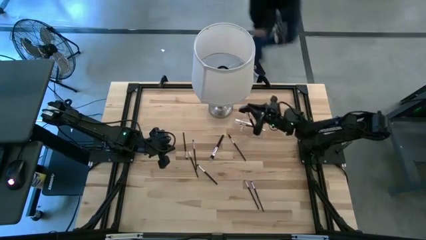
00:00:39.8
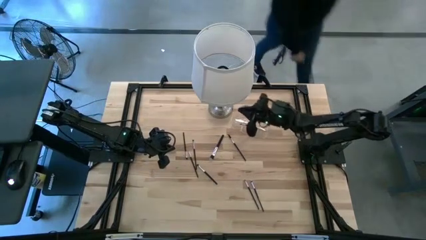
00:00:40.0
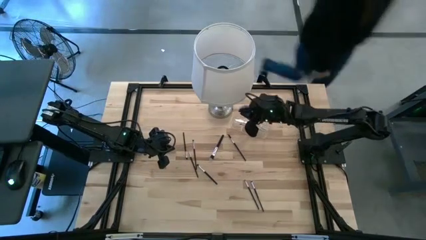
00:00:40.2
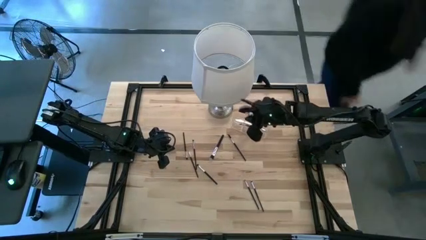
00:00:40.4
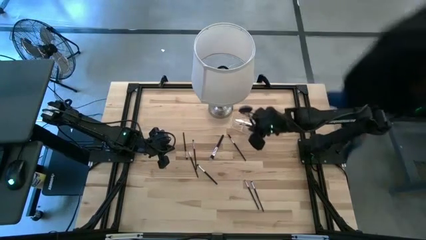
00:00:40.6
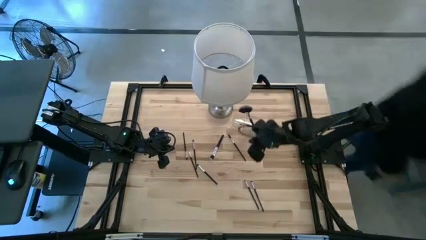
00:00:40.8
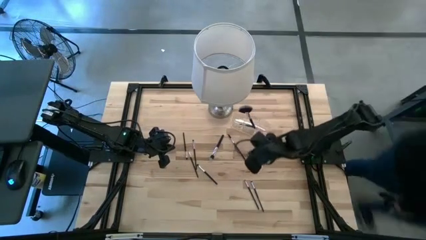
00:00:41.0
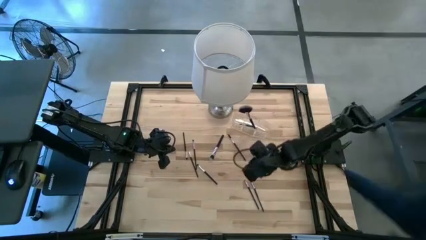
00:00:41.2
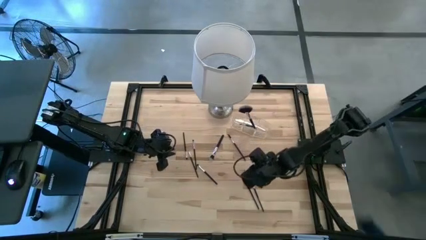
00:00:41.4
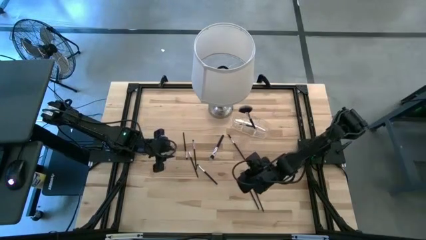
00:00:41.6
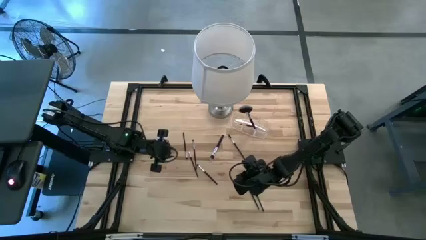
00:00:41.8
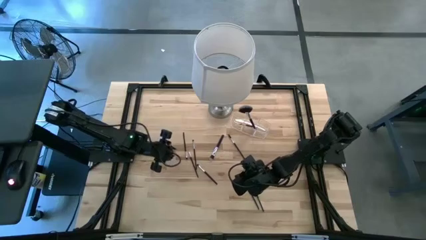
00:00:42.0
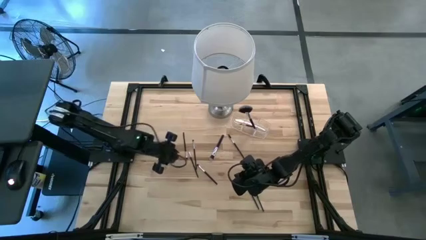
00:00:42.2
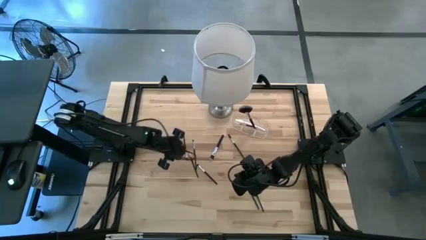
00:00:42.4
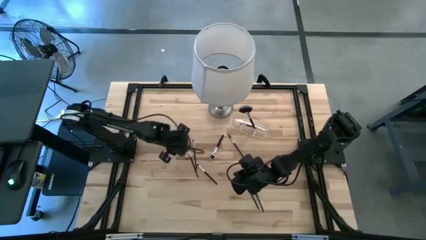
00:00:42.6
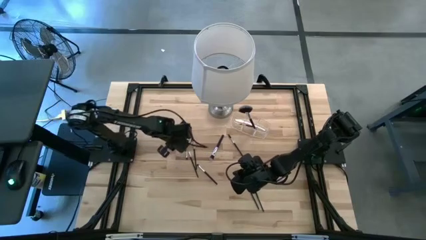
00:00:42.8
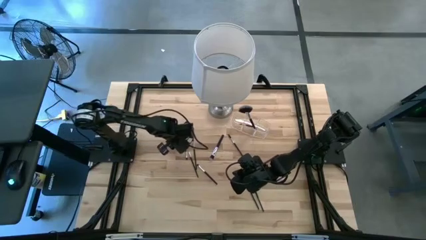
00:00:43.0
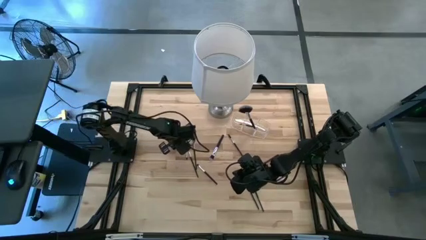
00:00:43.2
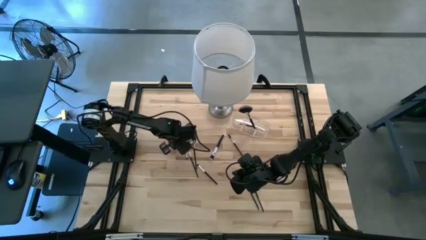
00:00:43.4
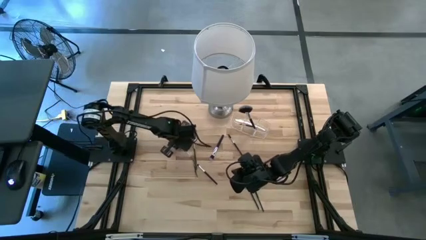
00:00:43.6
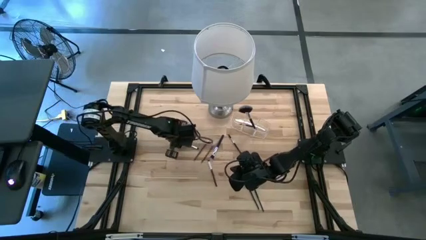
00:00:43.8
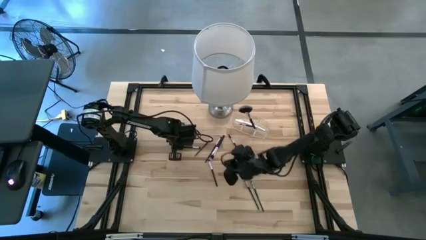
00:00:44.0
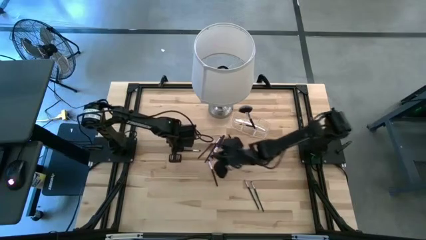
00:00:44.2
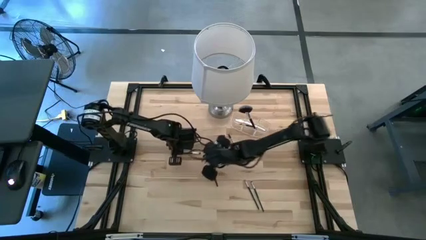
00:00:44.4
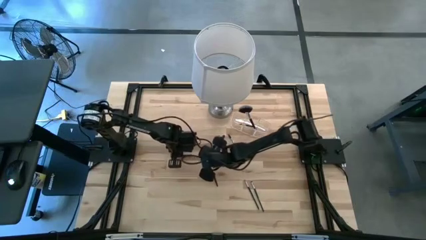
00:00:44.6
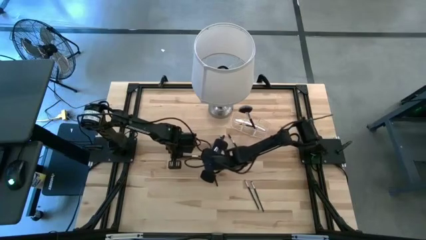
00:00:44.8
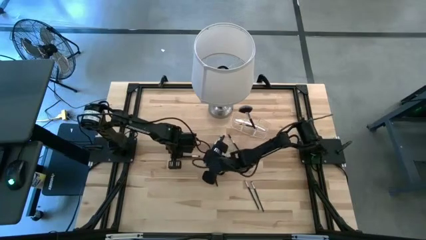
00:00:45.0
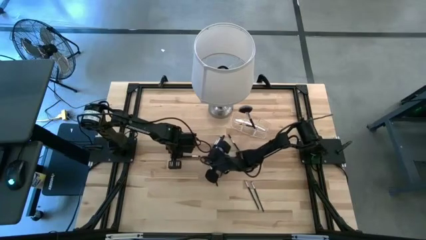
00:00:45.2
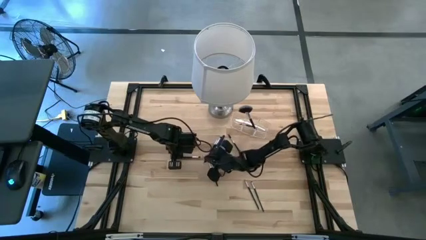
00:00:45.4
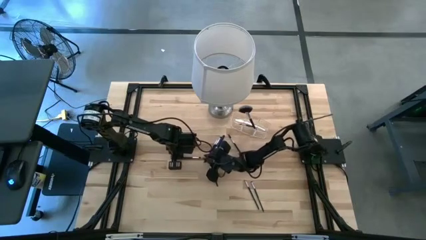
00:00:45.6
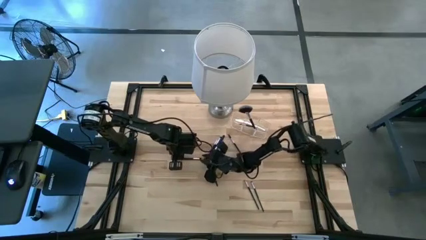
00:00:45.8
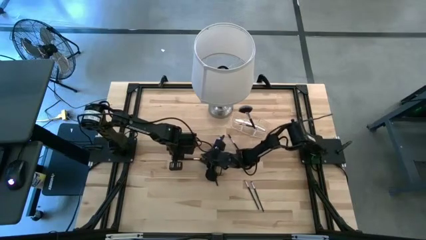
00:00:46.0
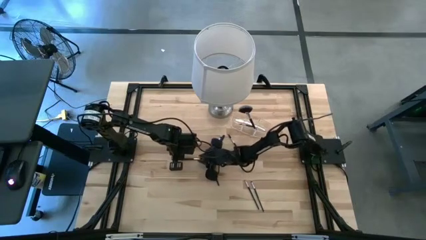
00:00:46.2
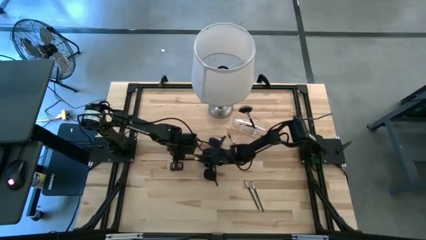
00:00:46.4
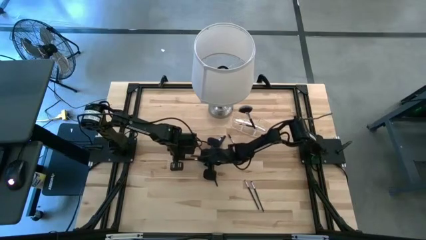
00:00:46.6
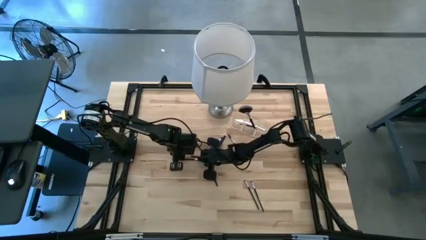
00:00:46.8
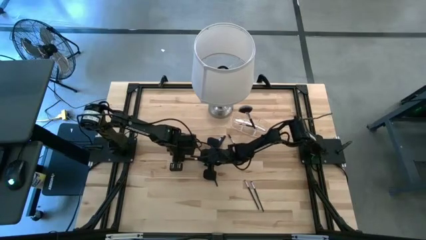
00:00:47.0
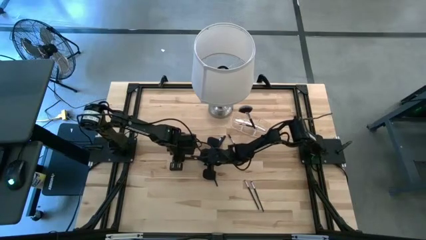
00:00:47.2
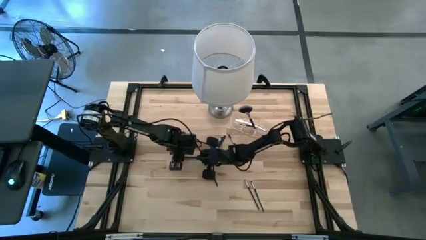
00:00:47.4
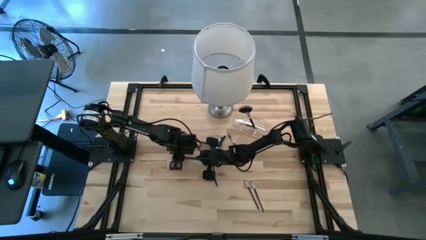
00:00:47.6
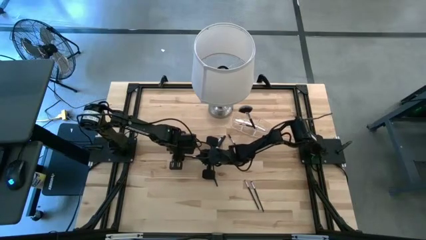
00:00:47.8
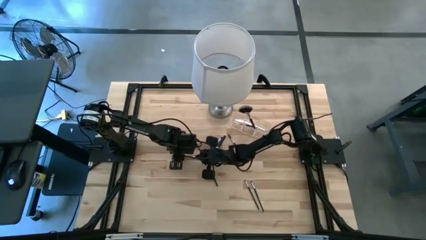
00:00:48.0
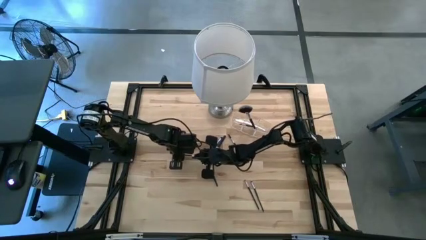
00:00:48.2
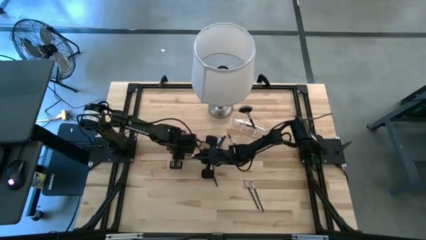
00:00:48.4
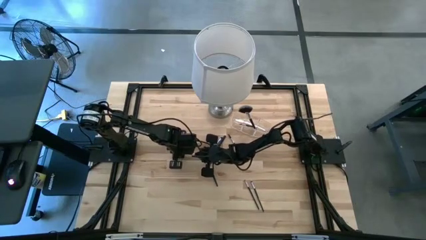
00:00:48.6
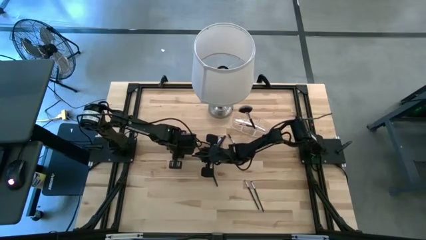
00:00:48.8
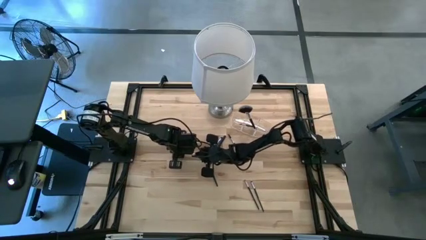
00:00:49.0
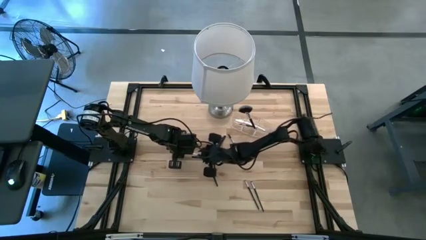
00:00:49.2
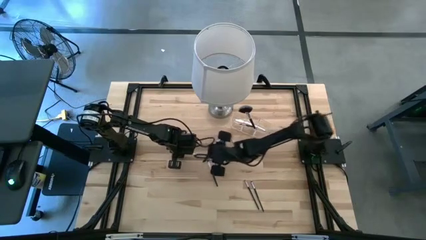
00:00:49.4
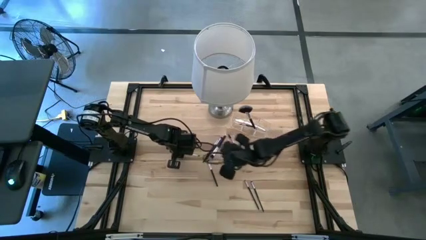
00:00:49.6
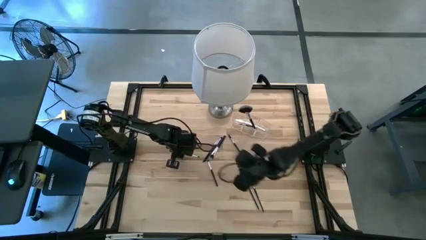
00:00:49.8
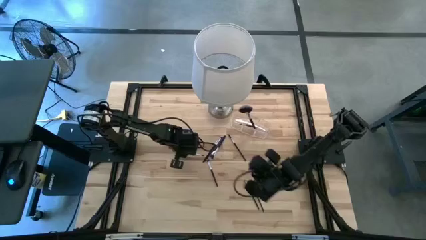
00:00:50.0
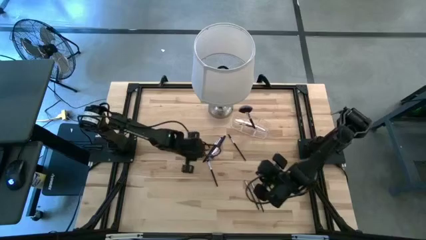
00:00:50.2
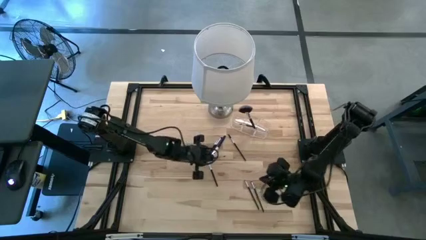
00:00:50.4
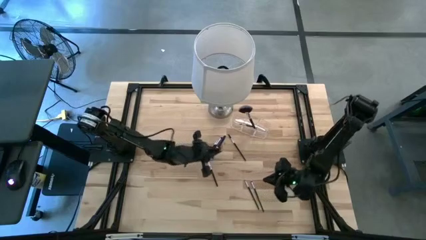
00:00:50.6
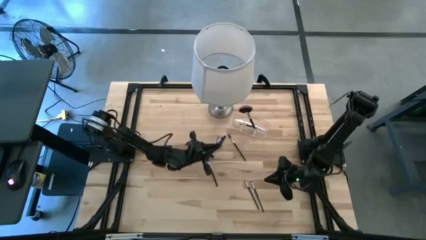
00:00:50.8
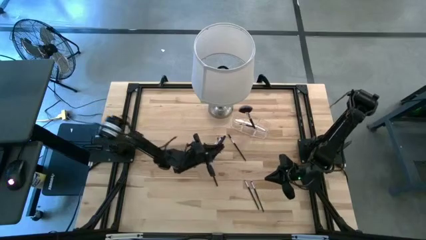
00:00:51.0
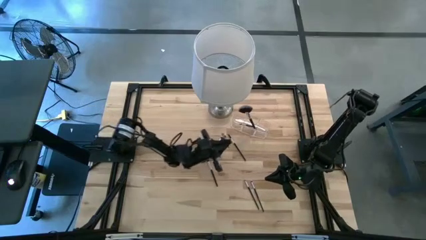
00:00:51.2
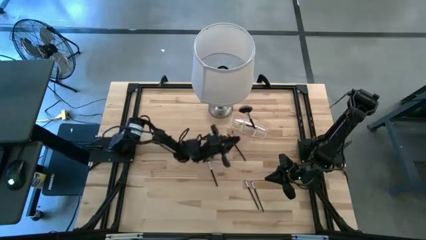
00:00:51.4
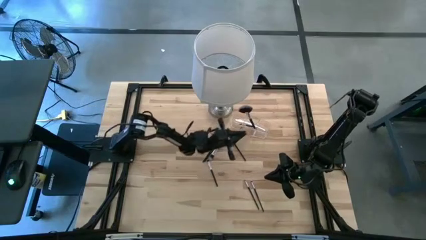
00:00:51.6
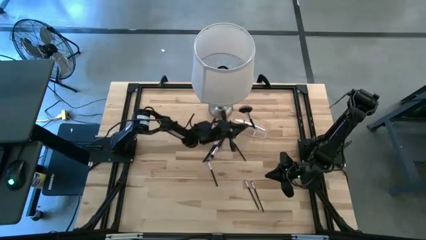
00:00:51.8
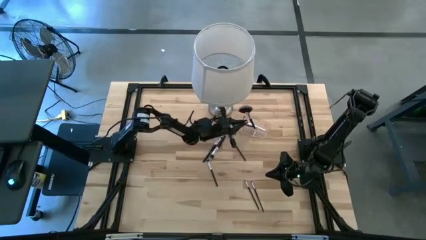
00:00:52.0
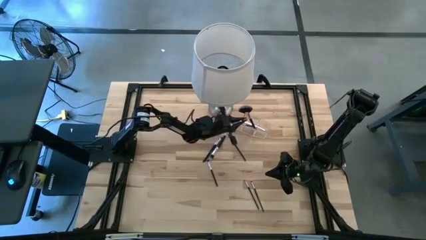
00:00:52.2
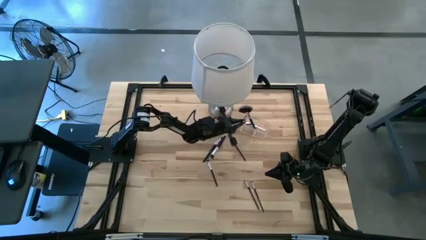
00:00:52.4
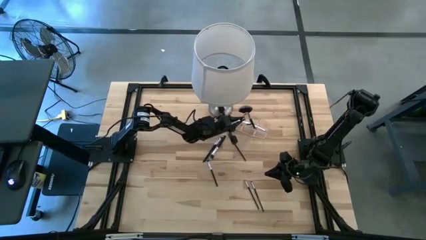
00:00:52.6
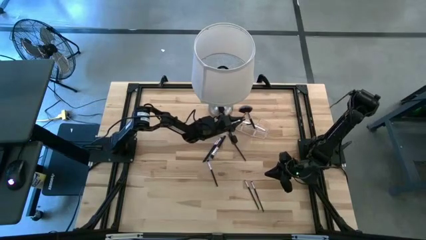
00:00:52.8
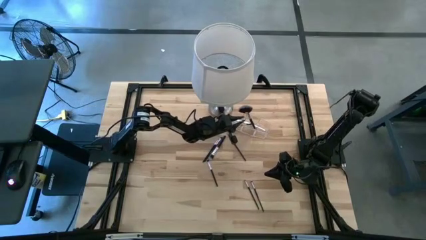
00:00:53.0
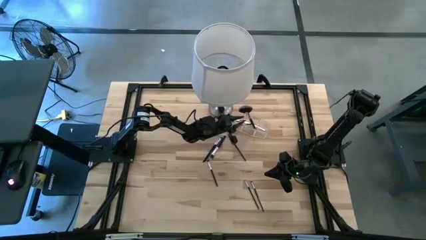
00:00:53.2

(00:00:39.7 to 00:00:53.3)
Task: Put items in baskets/containers
Put the black eyeshadow brush into the transparent organizer

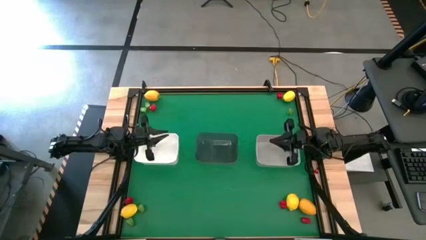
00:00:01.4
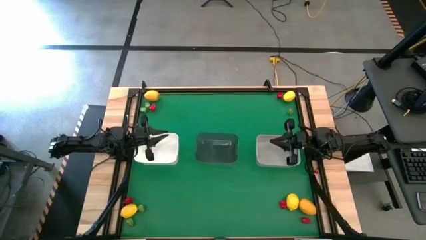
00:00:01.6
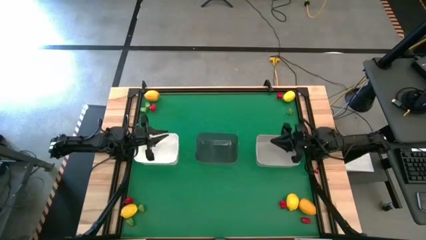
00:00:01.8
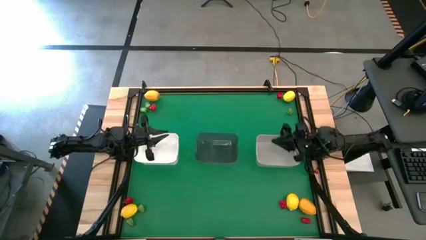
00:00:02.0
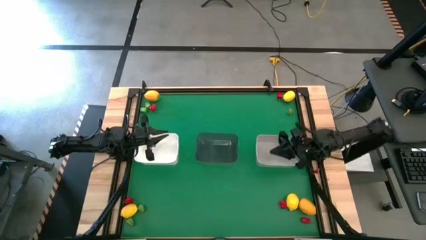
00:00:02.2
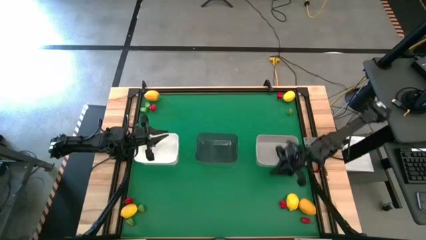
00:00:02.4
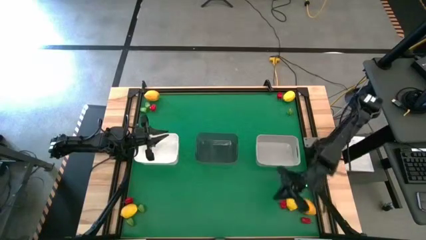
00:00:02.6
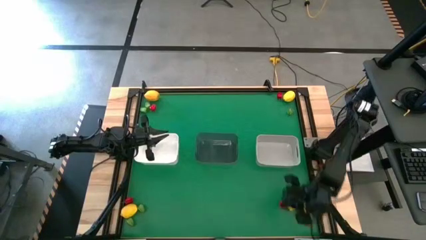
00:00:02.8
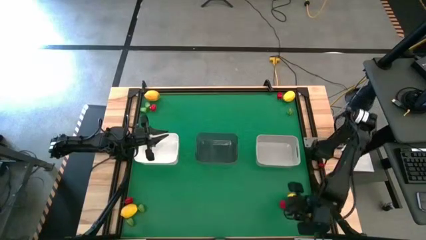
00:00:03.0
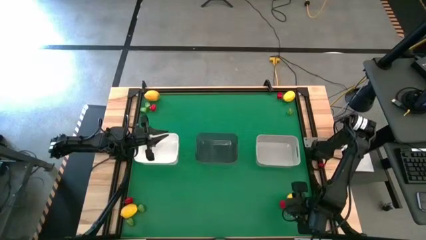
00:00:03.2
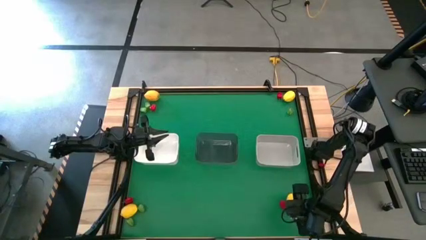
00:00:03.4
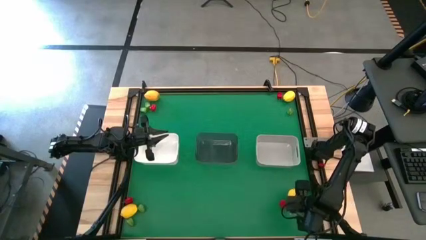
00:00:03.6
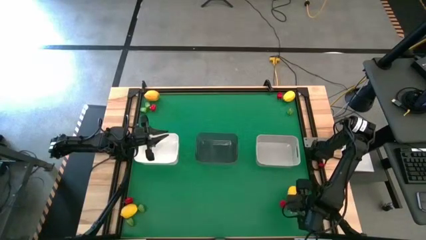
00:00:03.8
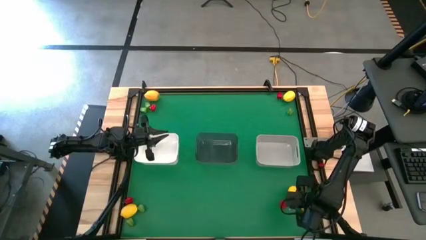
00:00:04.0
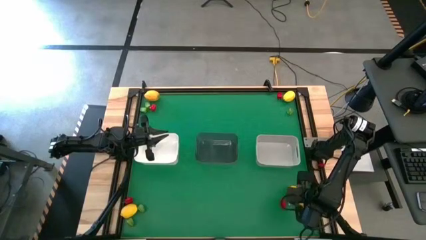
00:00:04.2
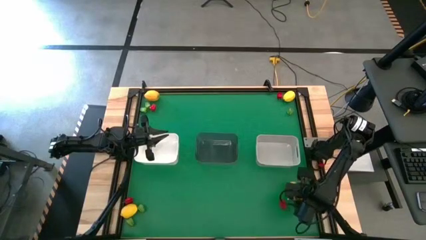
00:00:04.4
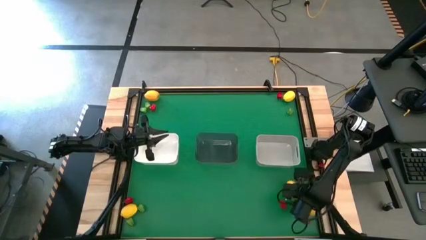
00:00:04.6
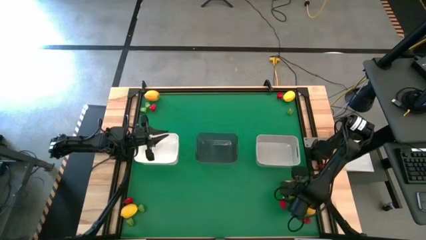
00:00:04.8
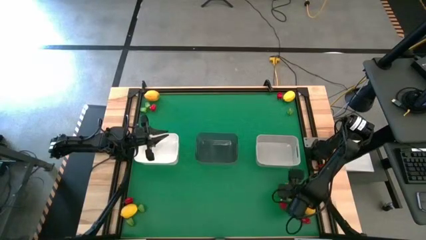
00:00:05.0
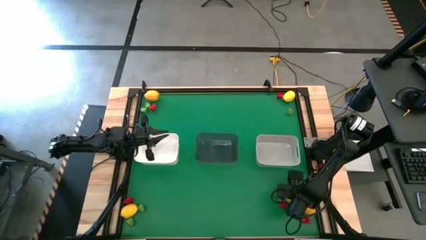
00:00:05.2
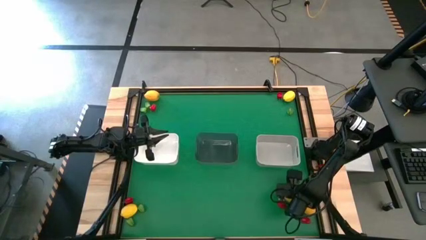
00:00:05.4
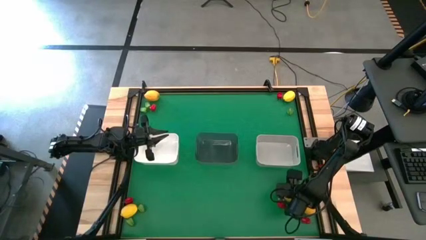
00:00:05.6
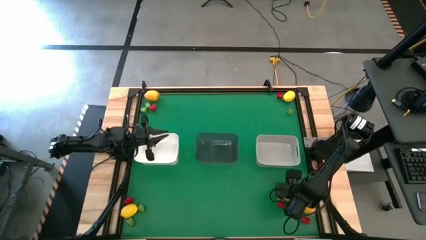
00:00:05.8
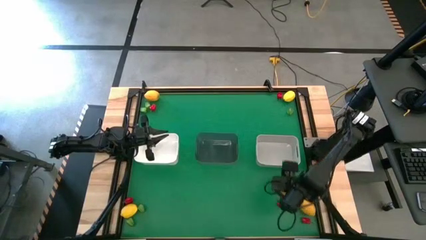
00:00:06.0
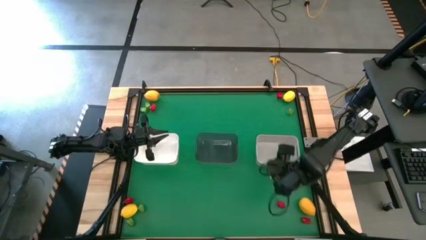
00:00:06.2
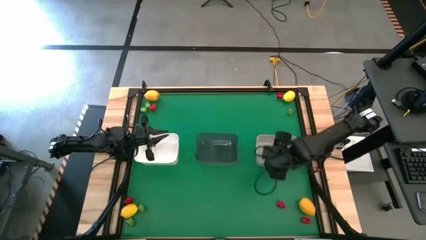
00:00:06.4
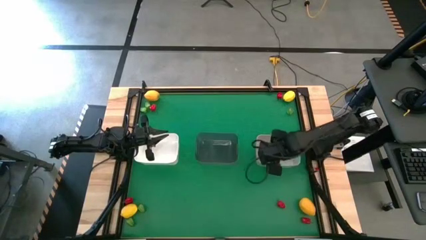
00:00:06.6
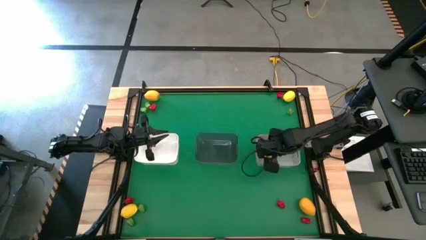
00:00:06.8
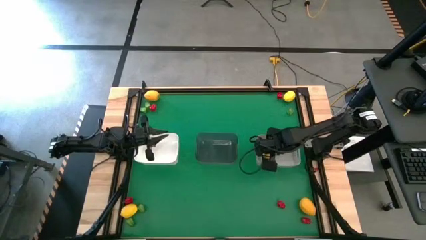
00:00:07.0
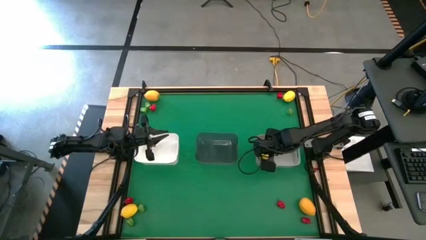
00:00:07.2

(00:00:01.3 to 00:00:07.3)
Task: Sort produce into baskets
Put the yellow lemon into the gray bin
